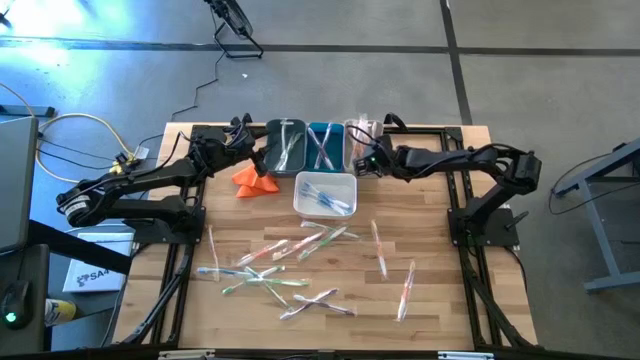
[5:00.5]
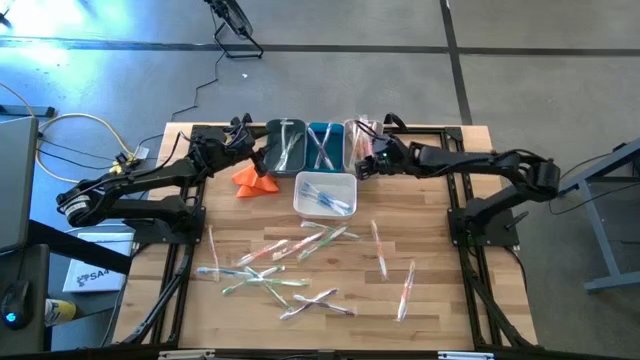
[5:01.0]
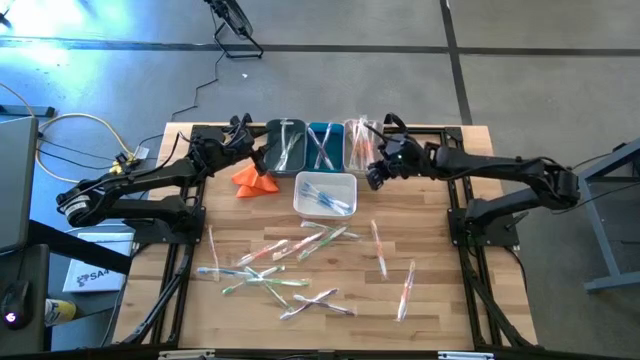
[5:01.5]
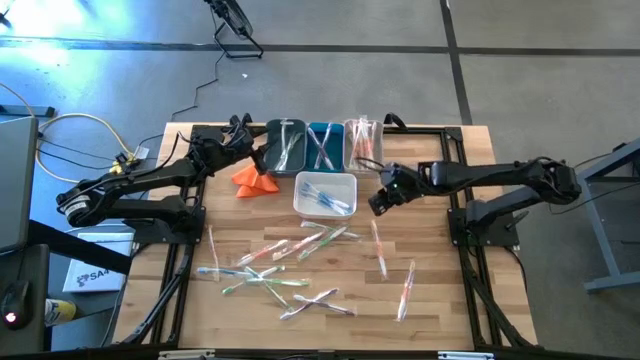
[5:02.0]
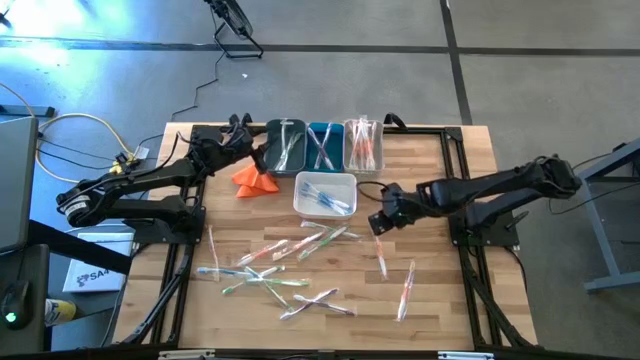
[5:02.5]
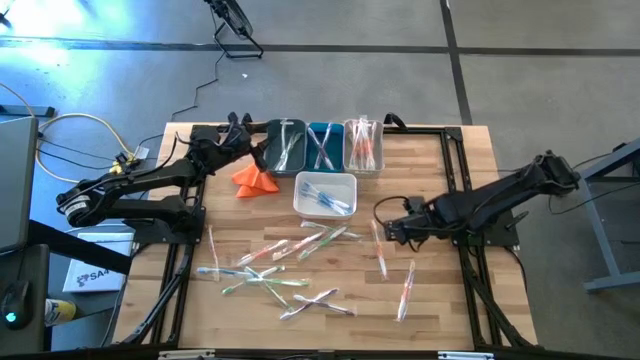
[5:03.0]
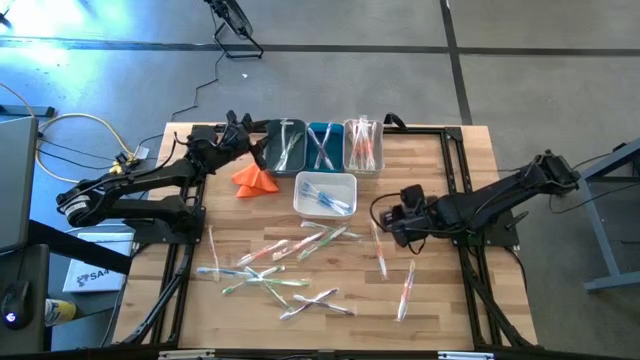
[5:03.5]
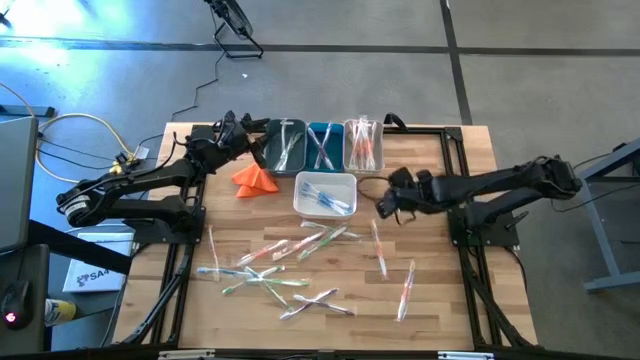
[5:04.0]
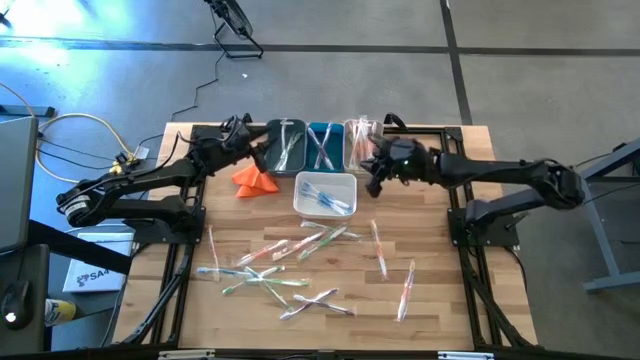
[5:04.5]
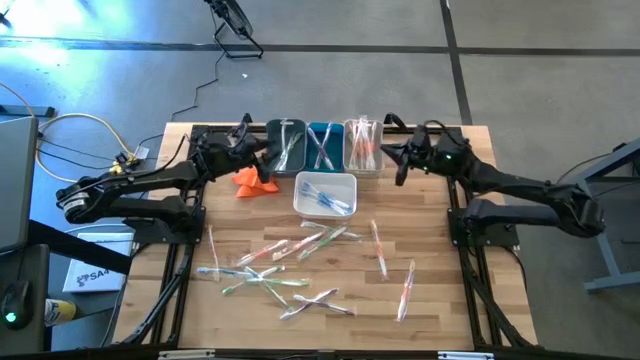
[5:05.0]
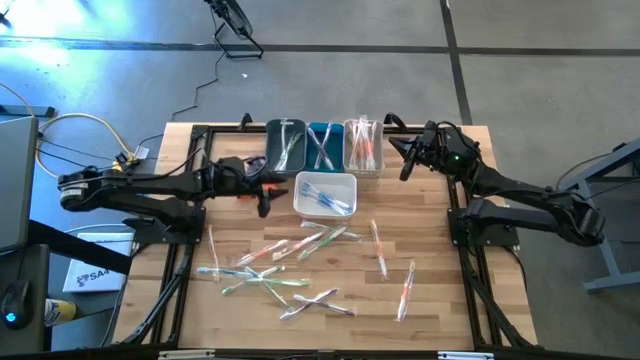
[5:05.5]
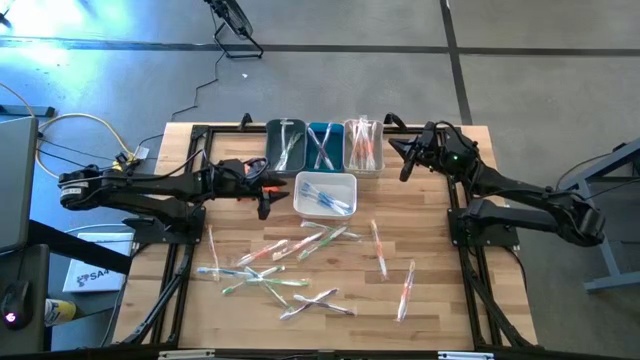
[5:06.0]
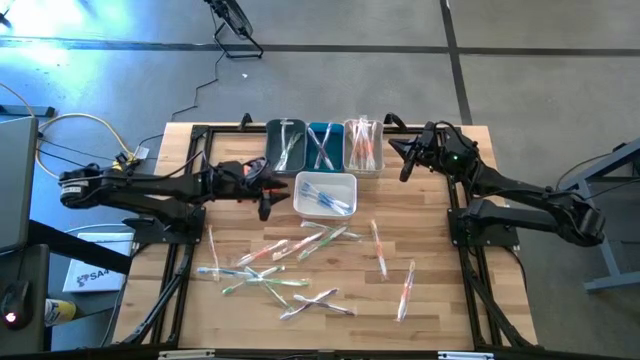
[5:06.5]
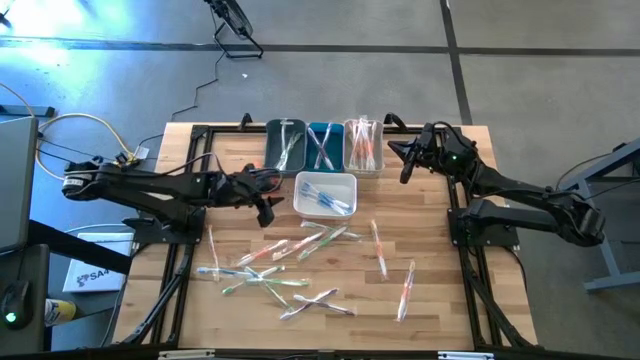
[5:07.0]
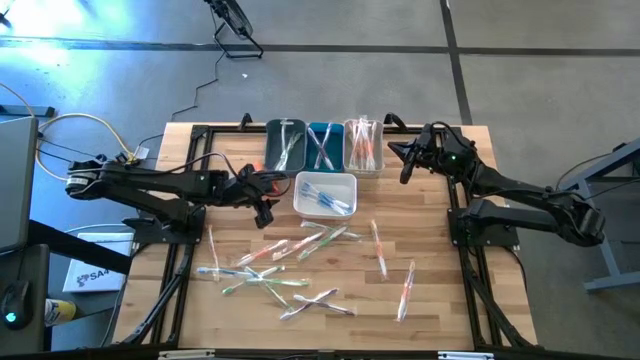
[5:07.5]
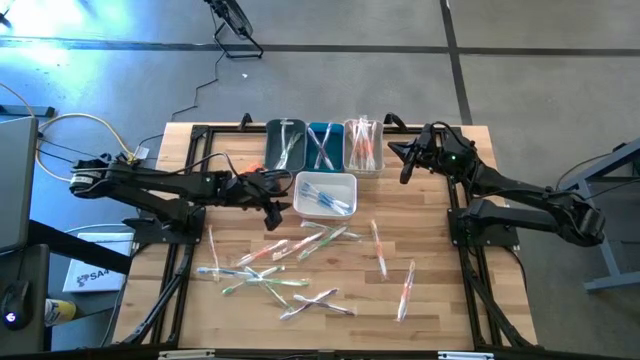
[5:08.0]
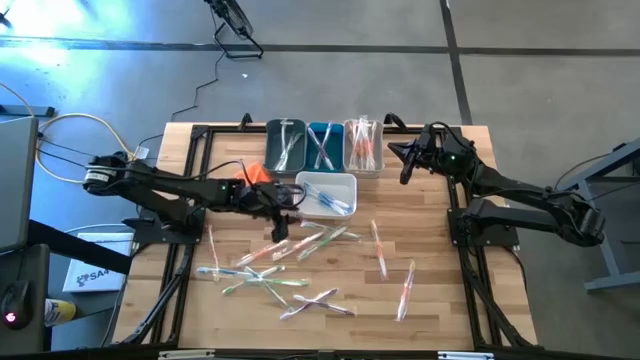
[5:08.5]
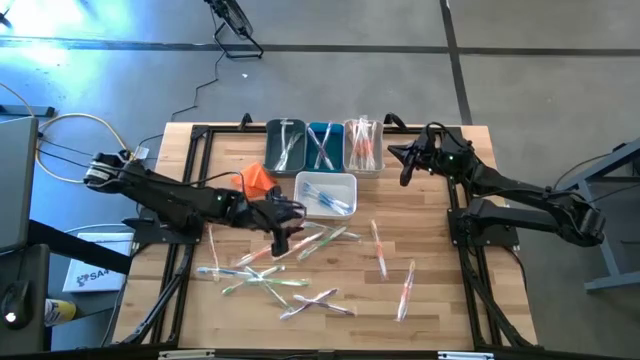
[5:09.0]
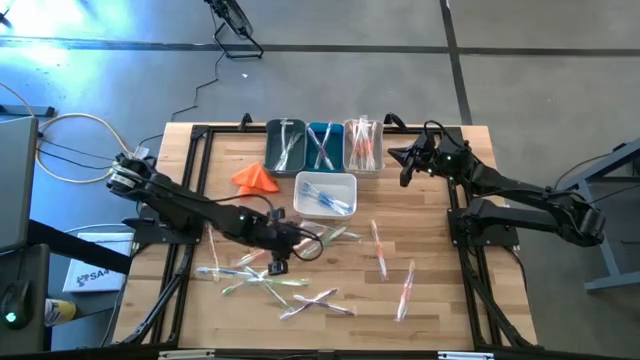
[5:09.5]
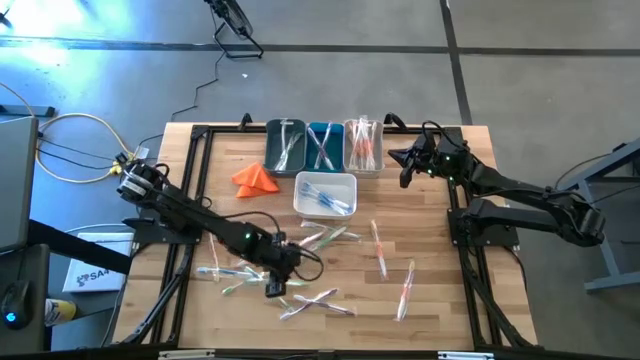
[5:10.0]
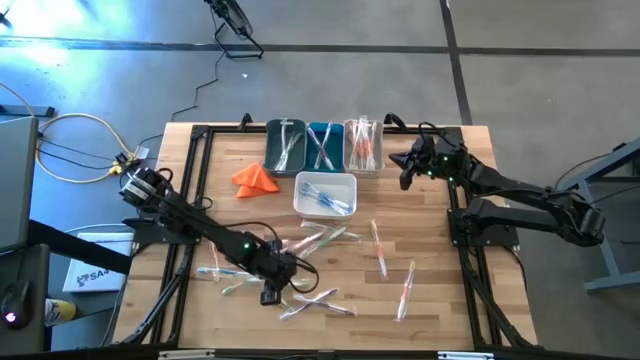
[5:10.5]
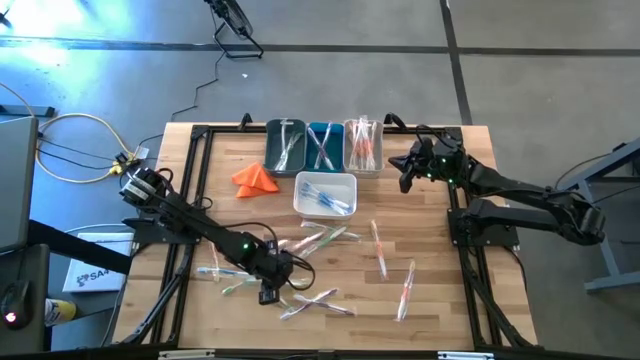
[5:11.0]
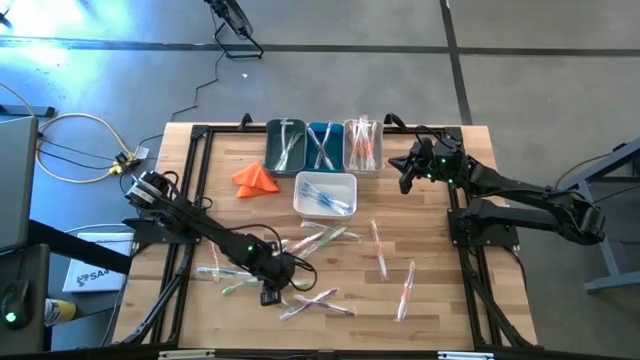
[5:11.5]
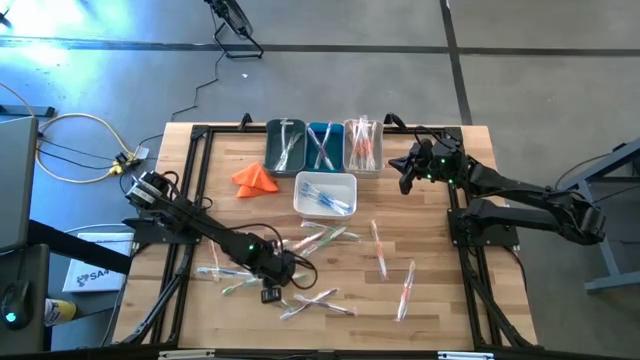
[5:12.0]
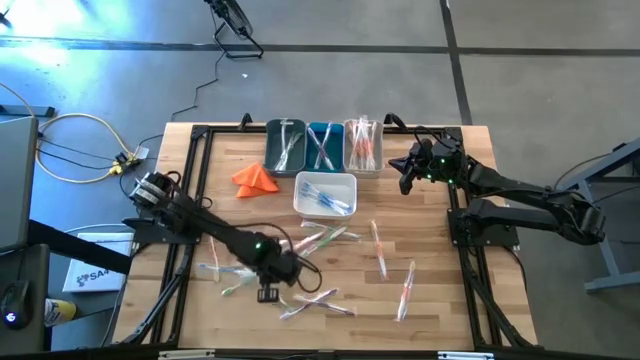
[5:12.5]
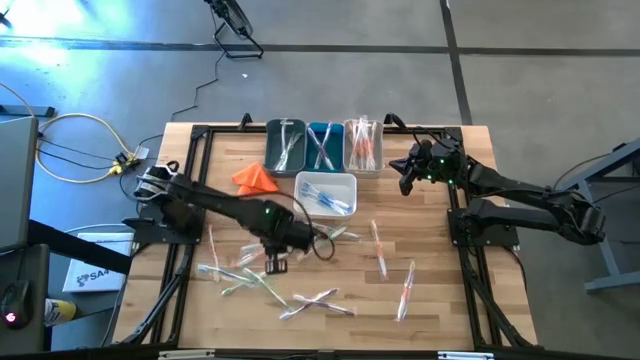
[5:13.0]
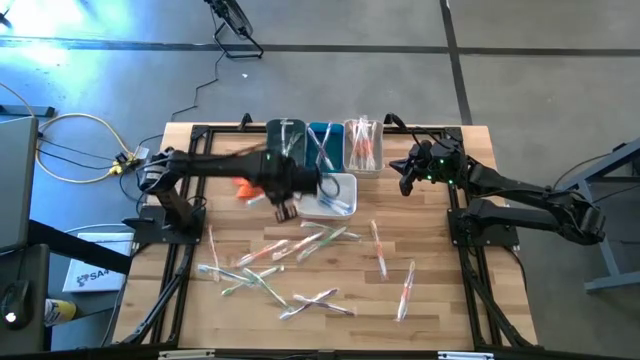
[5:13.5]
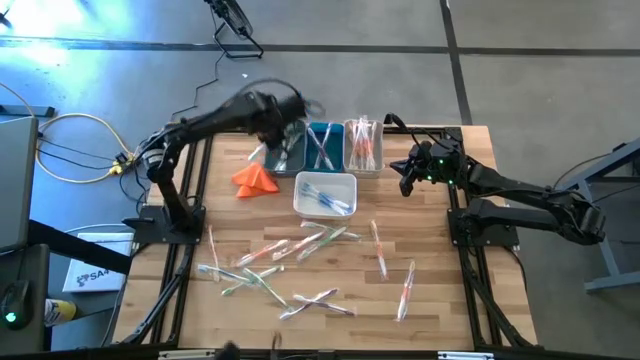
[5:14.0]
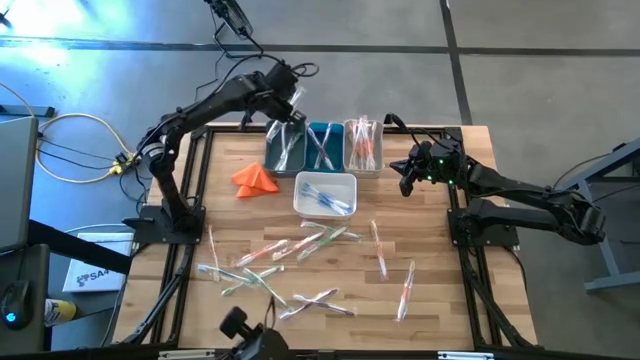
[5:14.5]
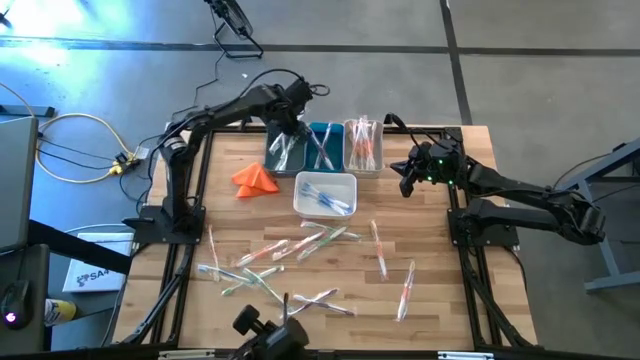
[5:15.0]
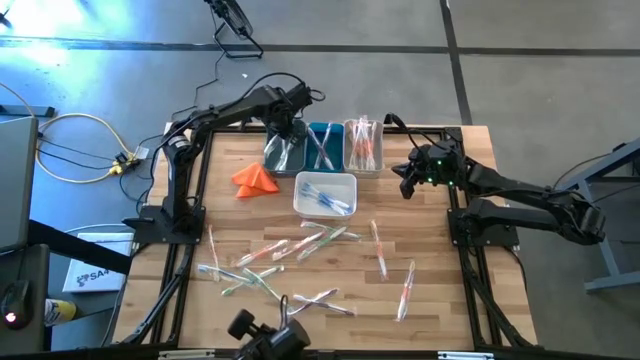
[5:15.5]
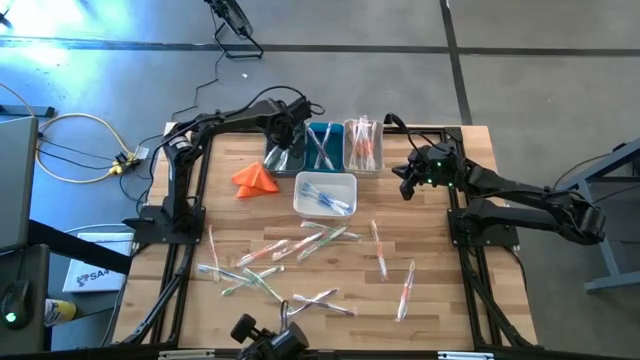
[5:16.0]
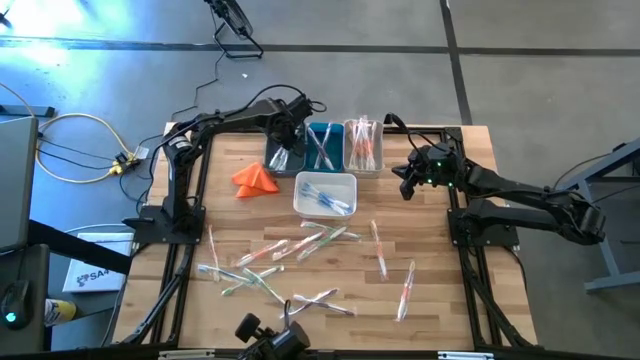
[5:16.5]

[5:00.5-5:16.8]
Task: Pick & Place Toothbrushes
Put the green toothbrush into the dark blue bin

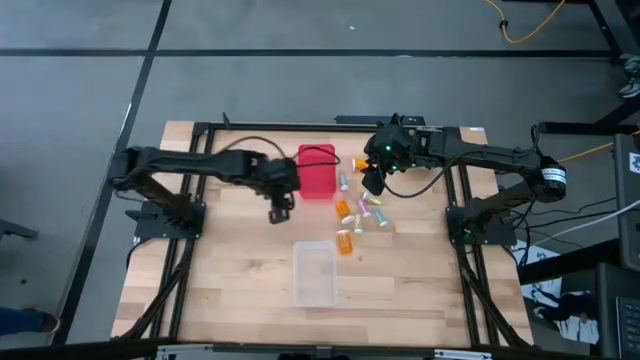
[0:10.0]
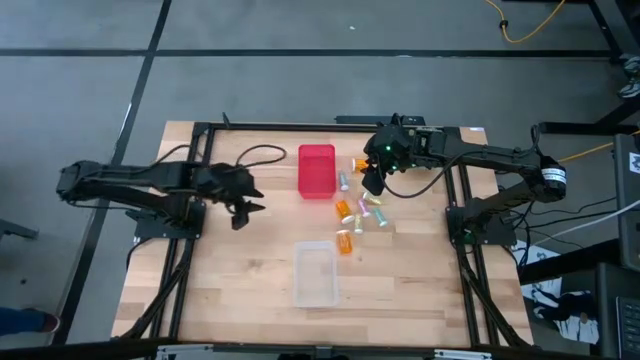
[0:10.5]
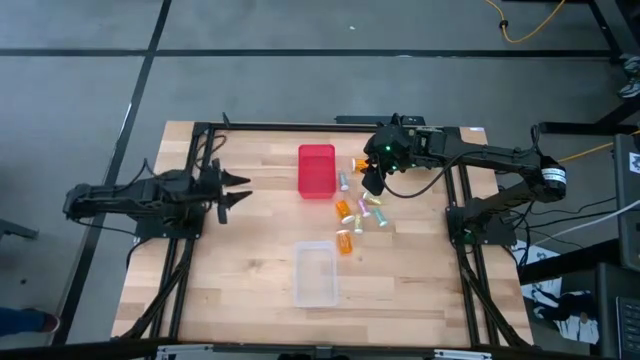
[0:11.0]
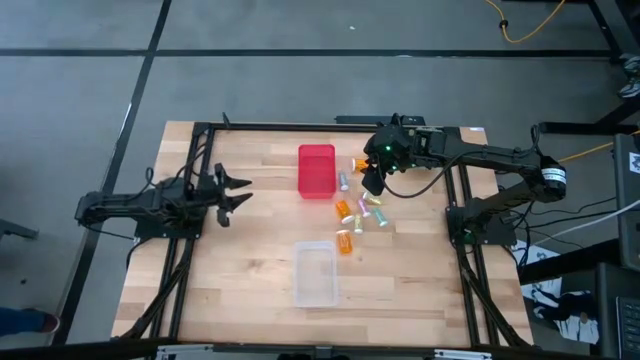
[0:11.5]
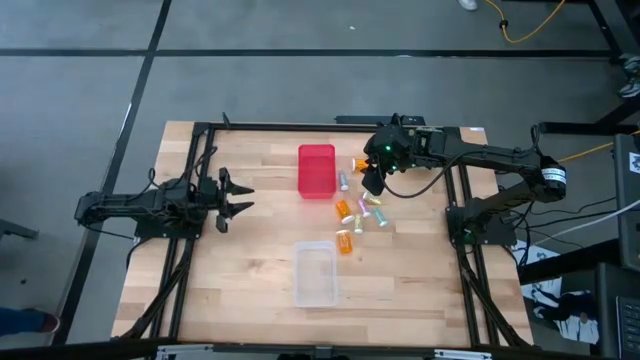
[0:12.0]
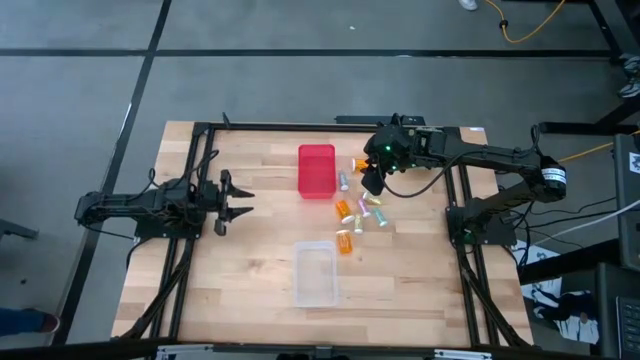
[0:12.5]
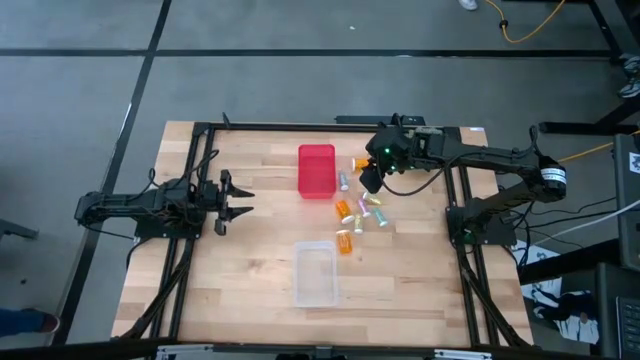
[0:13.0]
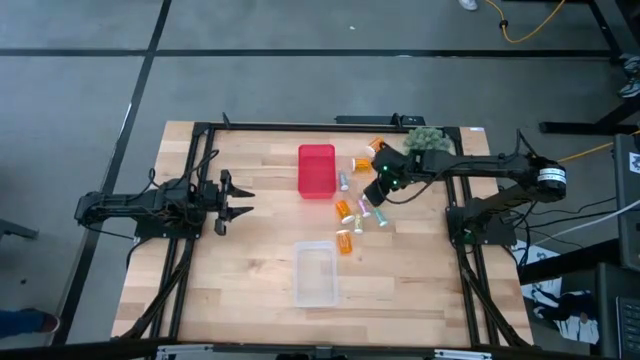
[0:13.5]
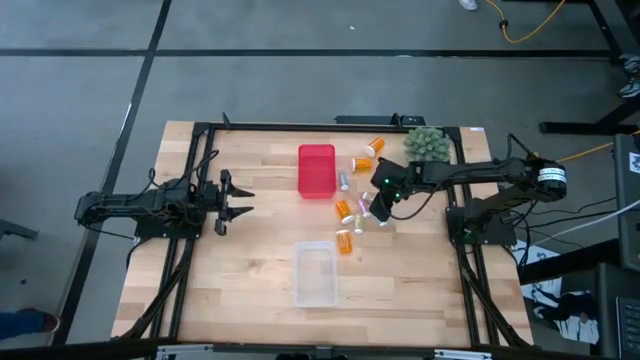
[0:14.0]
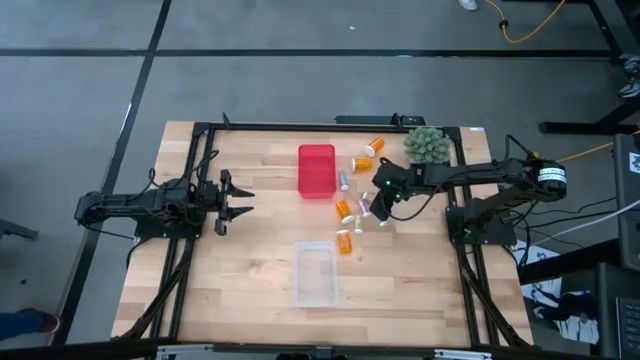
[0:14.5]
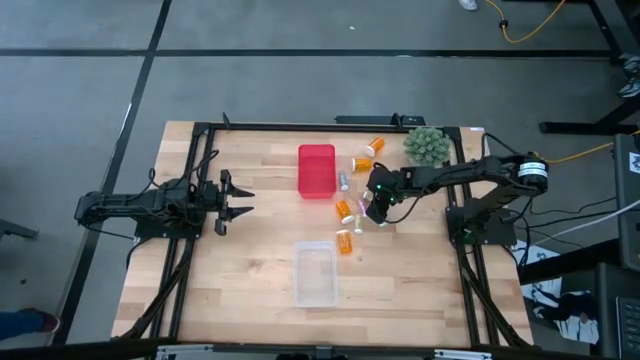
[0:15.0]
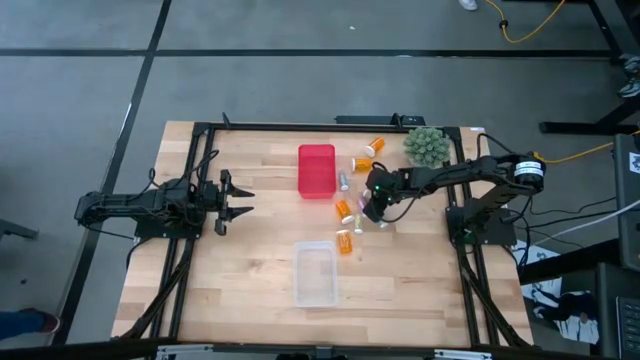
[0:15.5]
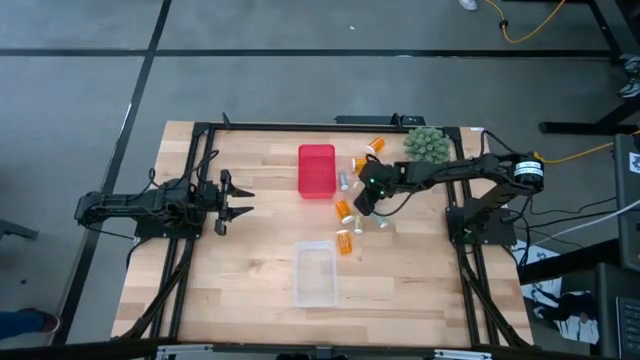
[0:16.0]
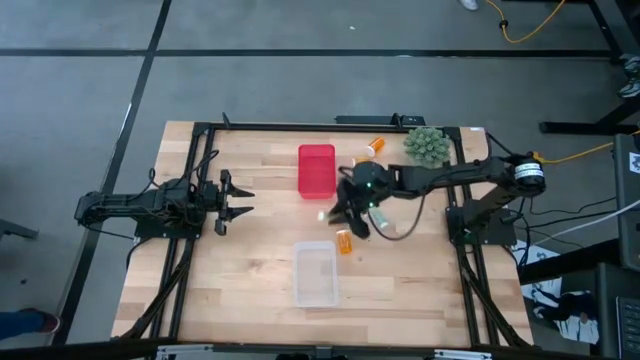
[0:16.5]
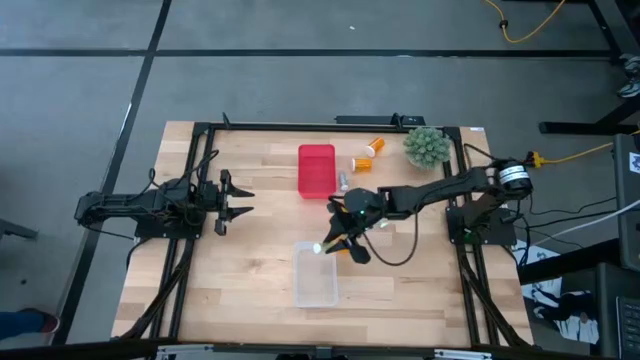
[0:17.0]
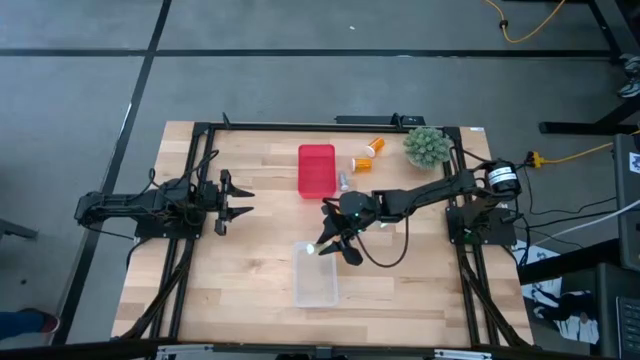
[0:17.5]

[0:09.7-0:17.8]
Task: Pick and place medicine bottles into bin by pill shape (circle, oval)
Put the small yellow pill bottle into the transparent bin
